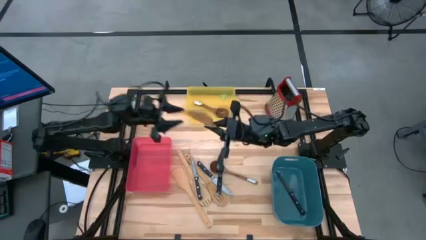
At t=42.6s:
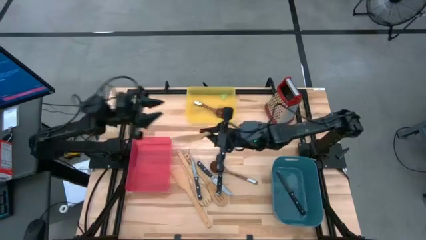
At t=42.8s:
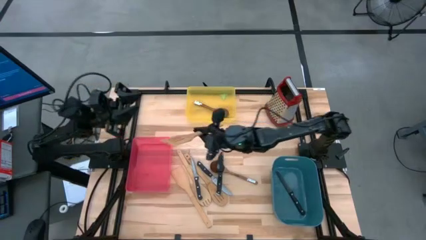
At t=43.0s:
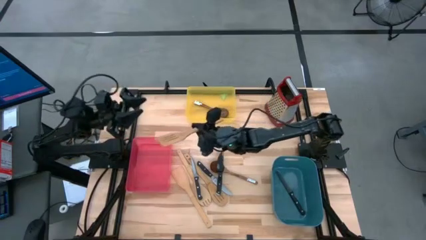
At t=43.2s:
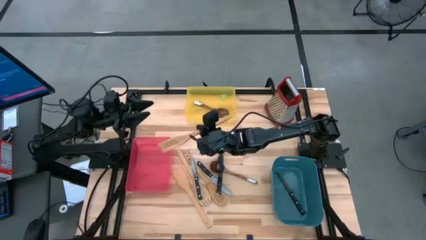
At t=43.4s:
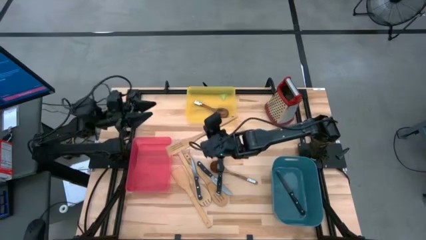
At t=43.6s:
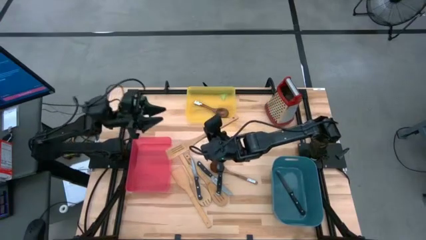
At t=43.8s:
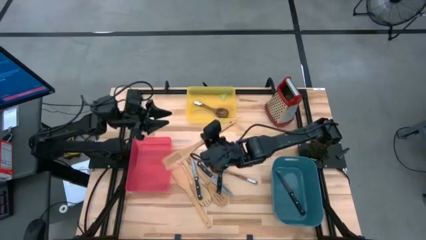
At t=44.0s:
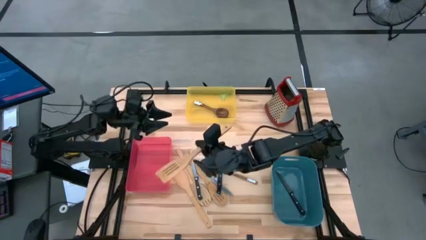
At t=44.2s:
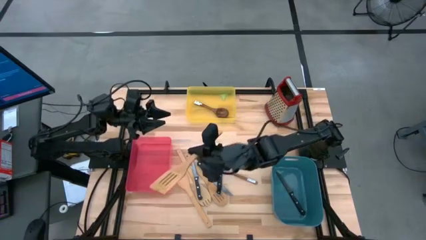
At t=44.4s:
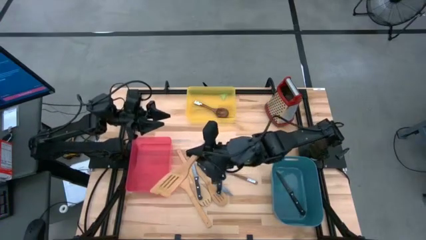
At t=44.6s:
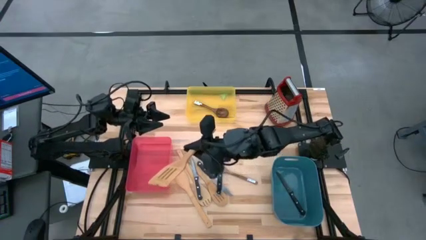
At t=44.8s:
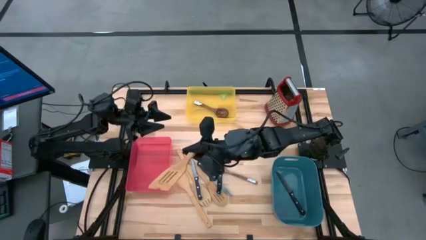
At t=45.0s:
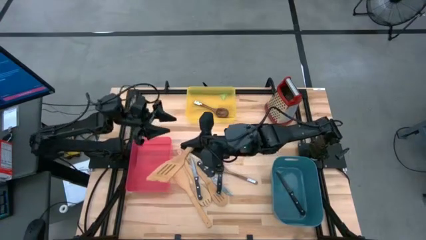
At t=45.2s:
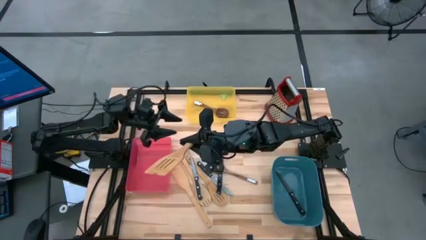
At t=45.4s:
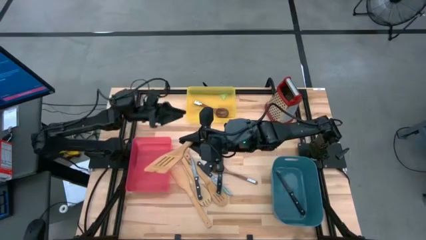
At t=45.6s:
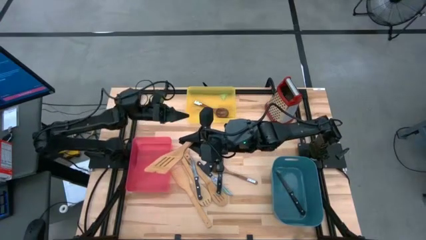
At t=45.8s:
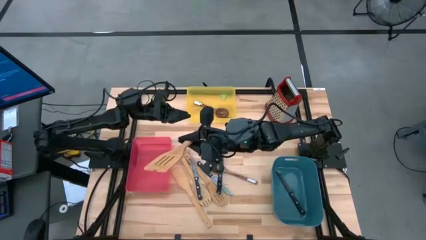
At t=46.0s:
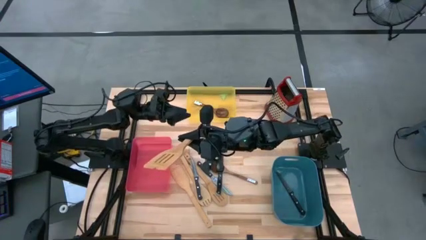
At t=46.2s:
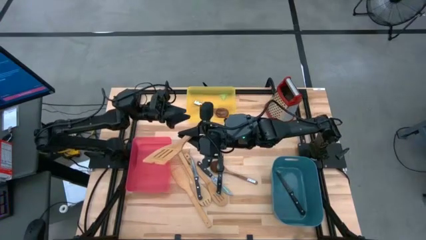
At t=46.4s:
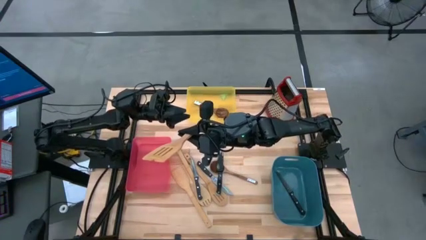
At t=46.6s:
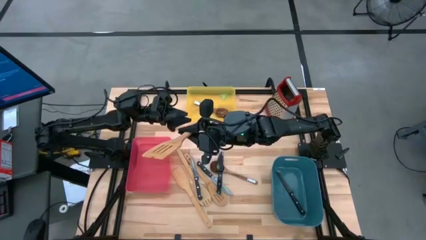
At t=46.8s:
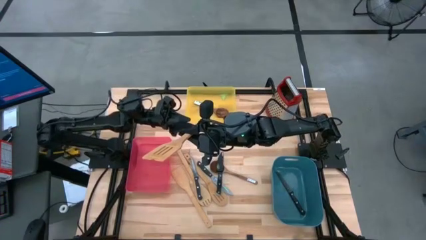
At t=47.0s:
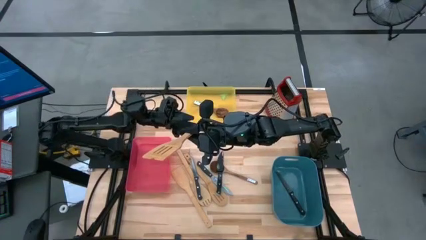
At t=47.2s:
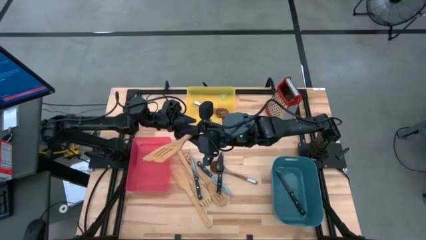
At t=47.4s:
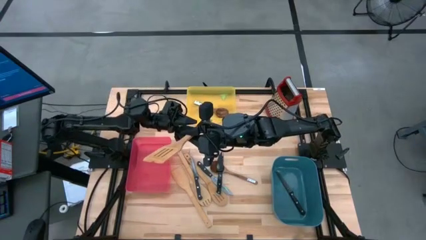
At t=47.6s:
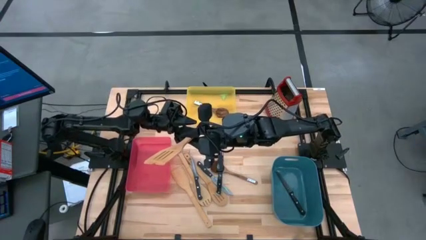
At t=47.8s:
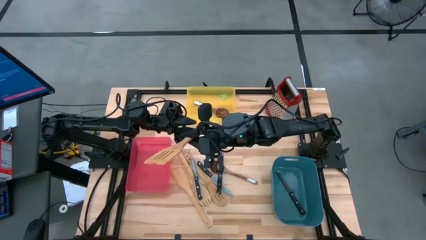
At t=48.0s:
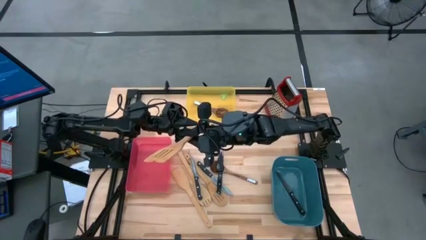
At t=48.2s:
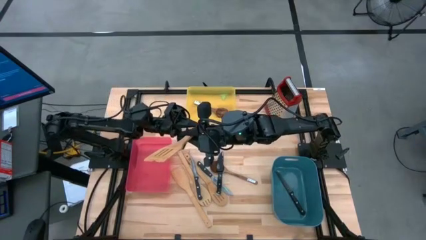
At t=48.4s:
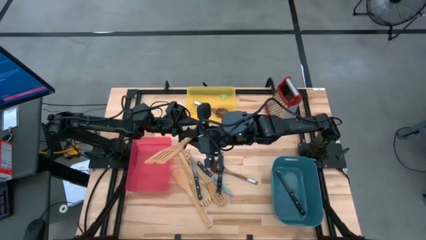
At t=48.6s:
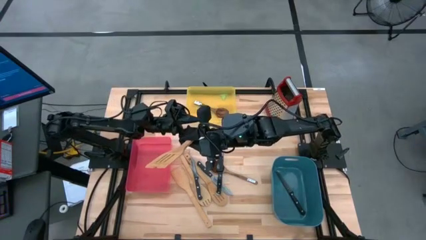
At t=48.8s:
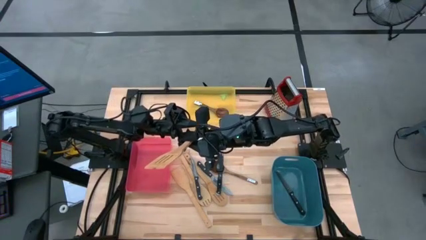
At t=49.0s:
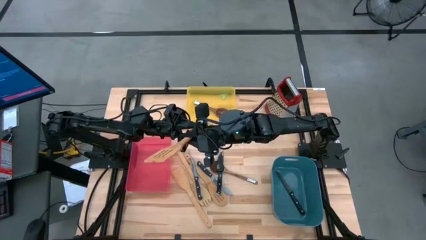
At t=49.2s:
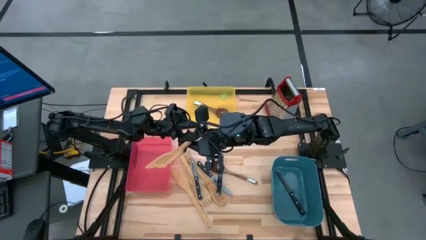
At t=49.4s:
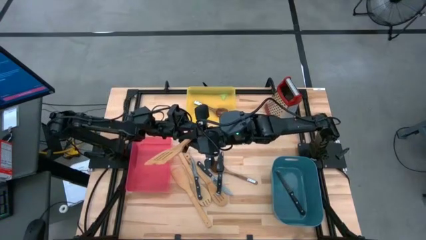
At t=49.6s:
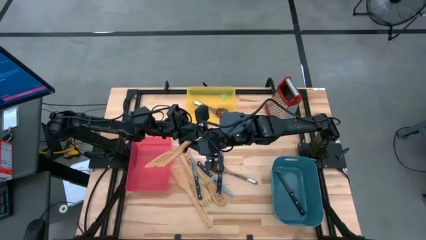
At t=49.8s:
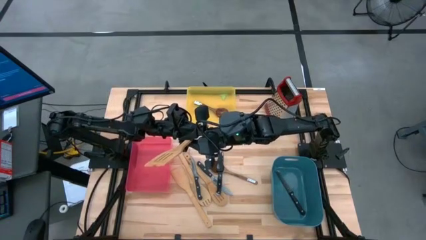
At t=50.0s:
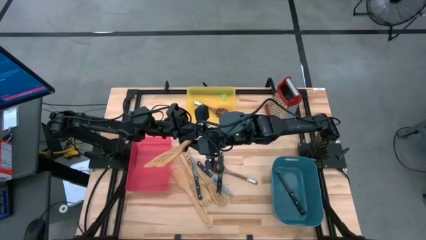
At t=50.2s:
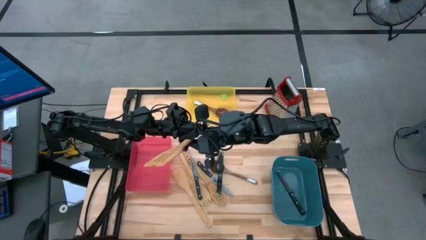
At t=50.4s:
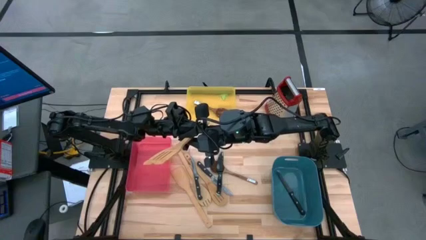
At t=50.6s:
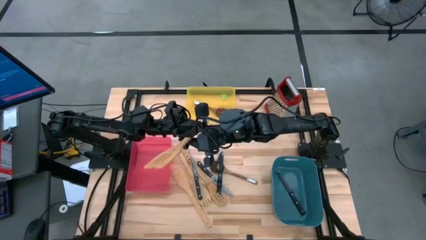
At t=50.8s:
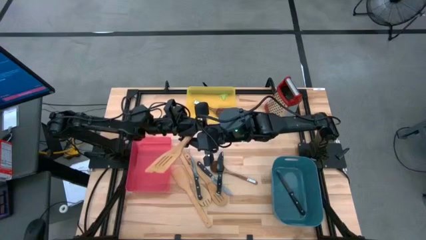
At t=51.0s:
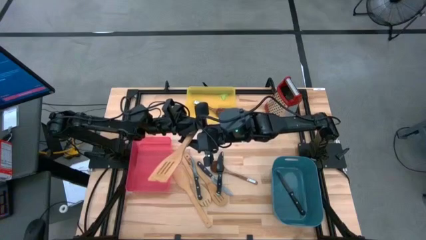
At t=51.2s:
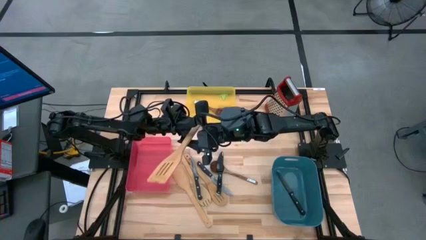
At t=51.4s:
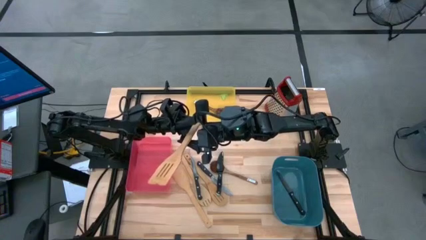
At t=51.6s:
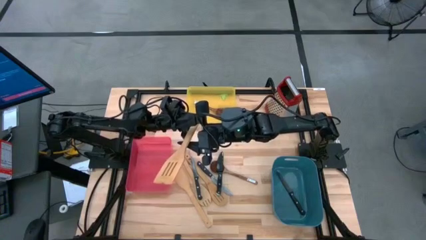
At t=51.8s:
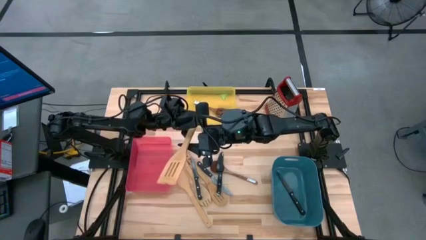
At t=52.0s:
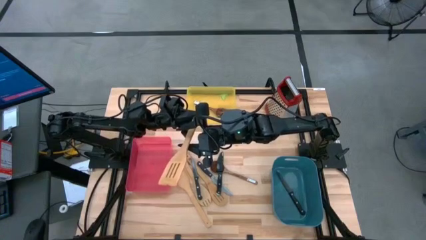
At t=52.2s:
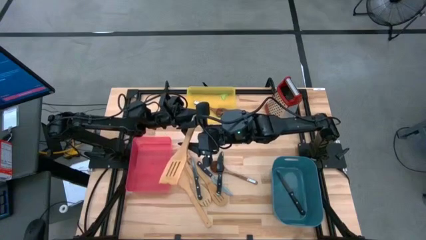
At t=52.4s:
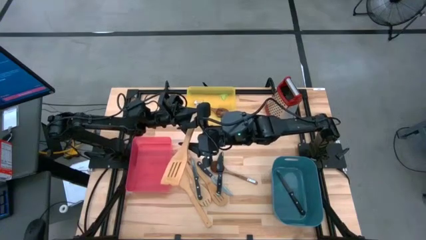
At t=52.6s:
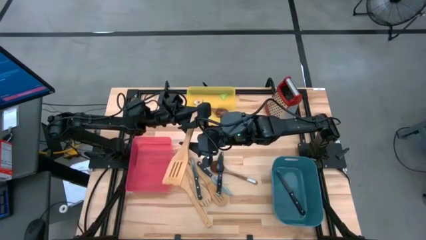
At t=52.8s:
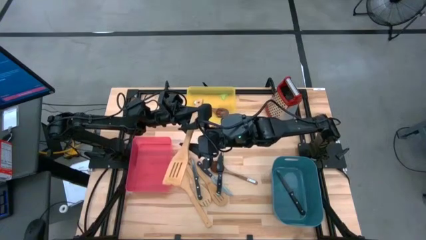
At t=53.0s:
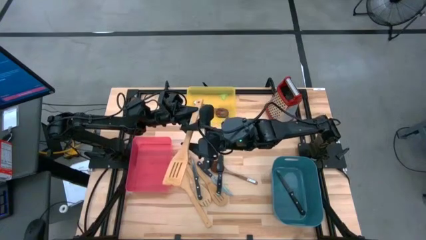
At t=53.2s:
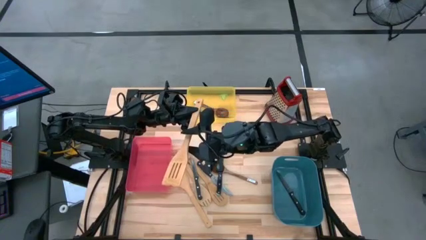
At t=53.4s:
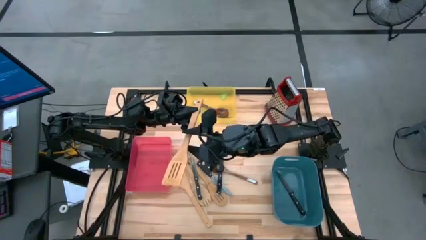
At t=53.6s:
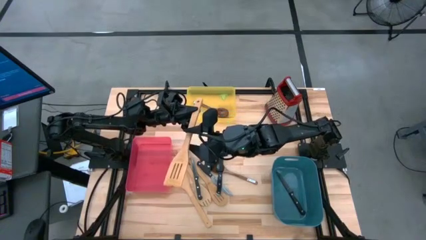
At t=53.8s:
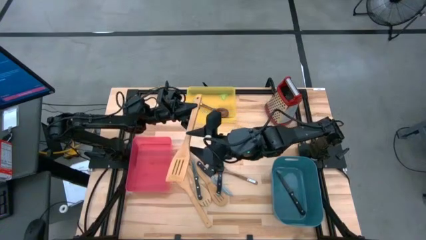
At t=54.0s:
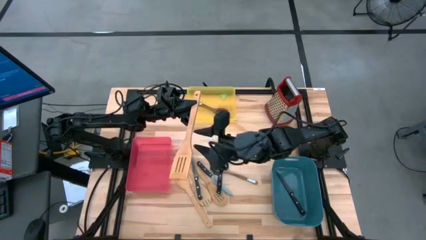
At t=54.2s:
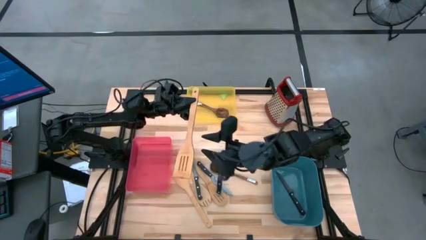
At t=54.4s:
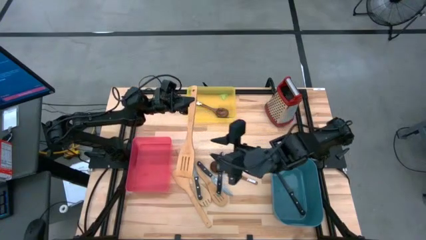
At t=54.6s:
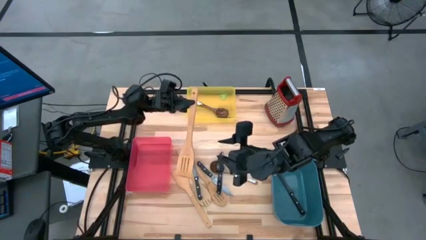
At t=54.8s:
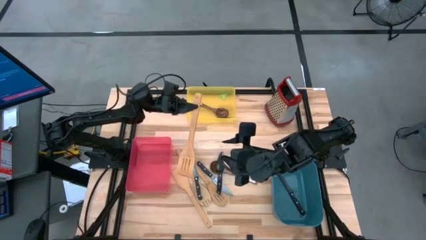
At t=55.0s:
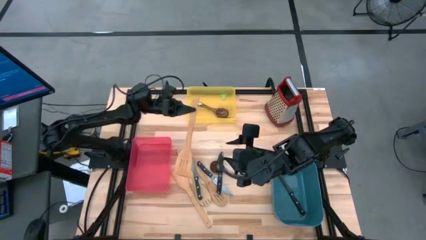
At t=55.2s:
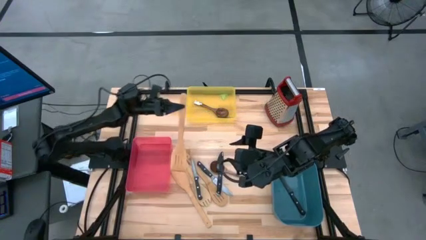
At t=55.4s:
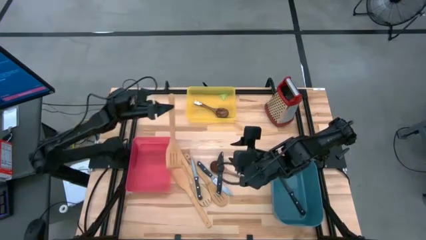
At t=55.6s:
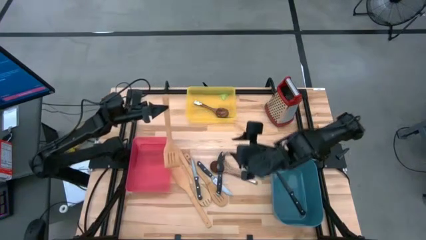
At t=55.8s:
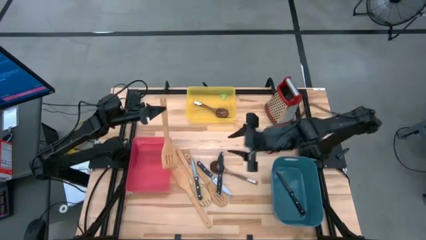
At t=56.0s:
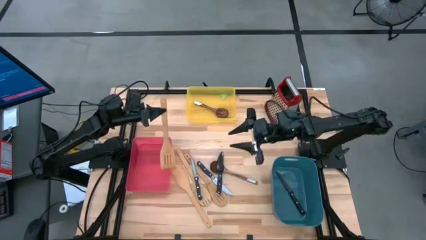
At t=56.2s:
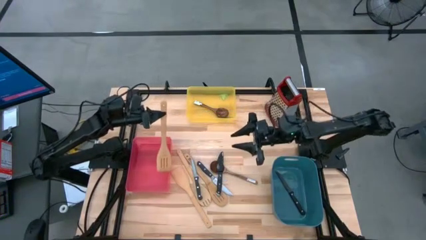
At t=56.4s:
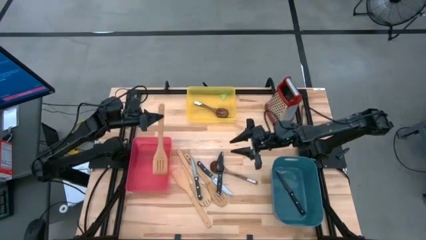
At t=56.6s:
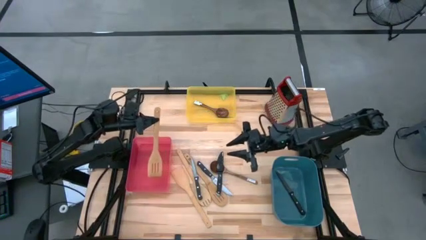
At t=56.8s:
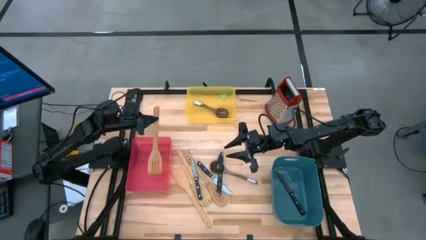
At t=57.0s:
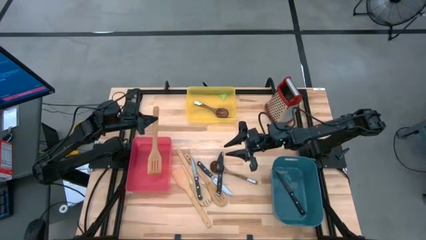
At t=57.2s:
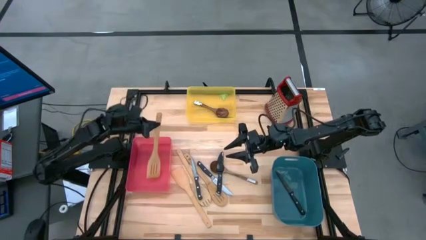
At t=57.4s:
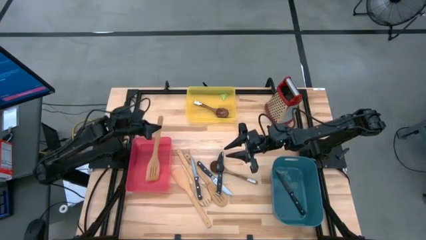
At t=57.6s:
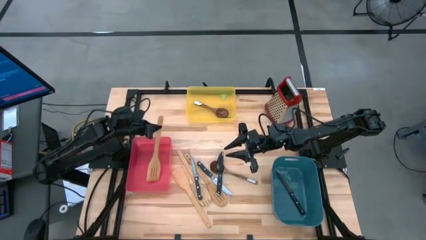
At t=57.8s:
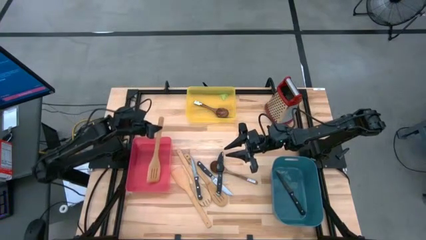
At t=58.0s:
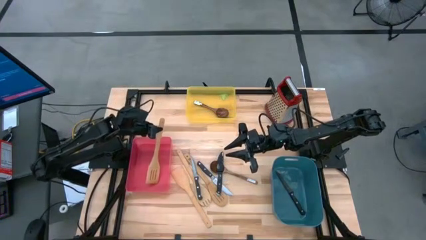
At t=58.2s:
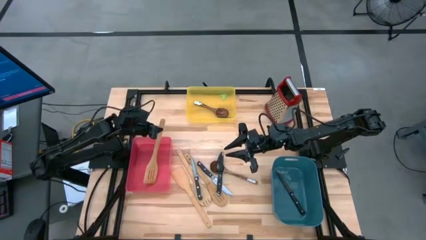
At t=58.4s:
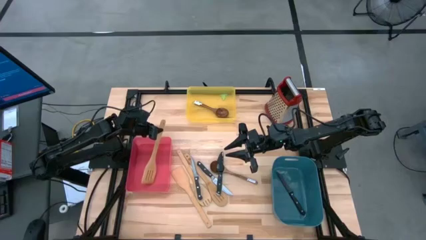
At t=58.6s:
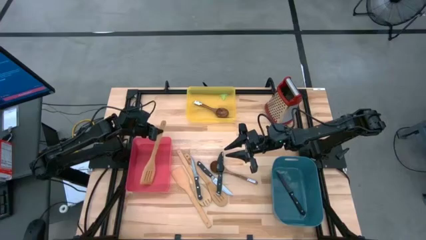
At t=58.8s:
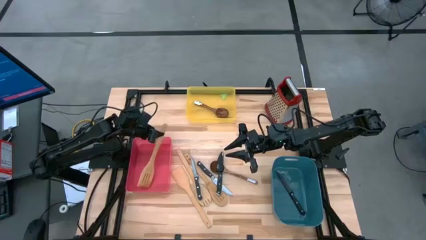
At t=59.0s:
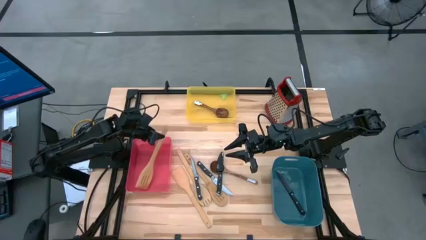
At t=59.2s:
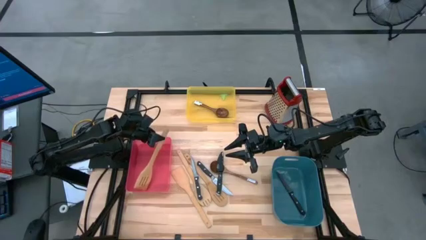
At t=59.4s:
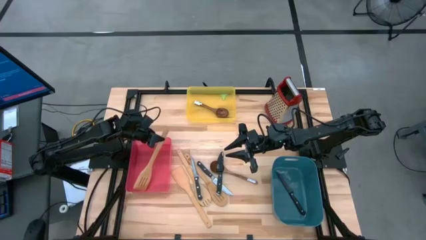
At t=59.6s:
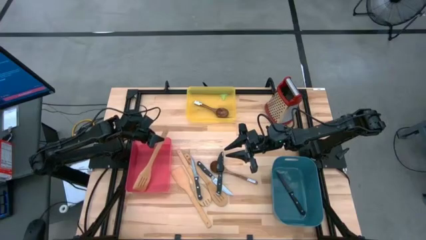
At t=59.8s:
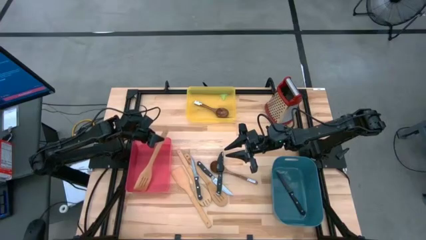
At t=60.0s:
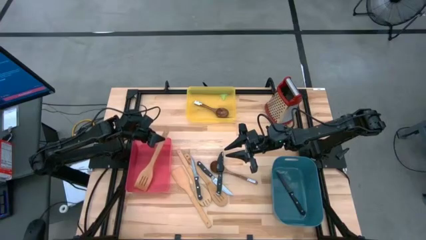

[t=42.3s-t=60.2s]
Task: Pick & Place Kitchen Items
Put the brown spatula into the red bin
